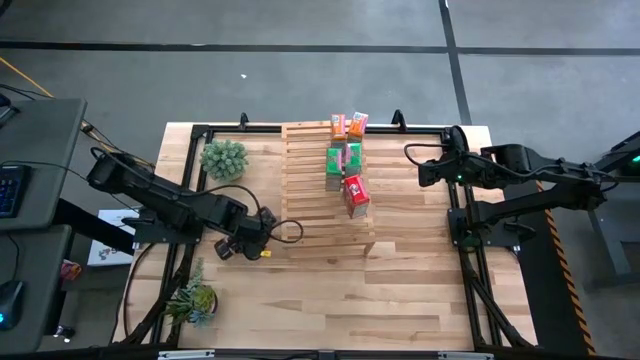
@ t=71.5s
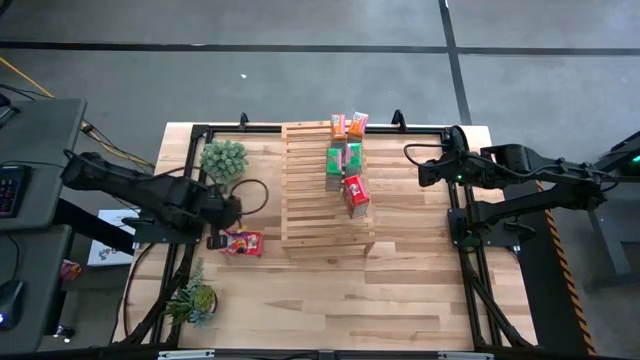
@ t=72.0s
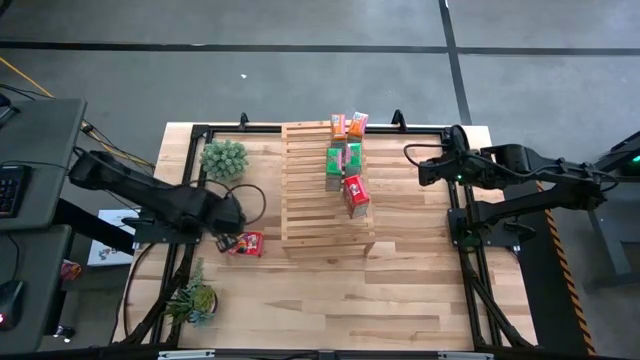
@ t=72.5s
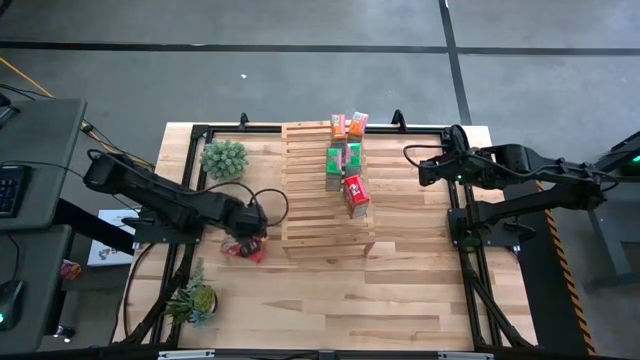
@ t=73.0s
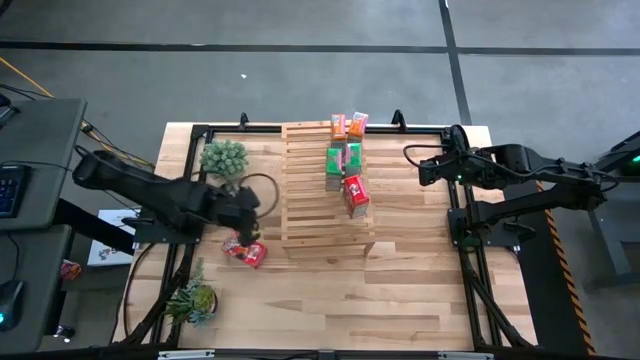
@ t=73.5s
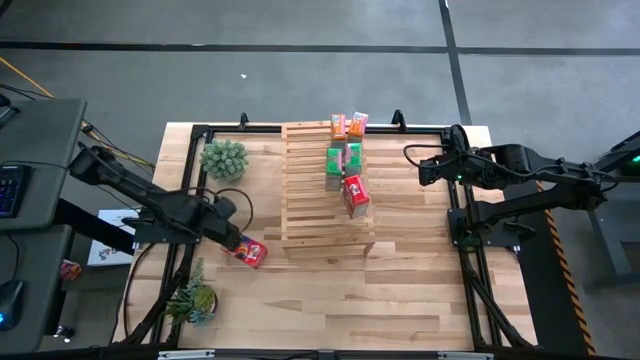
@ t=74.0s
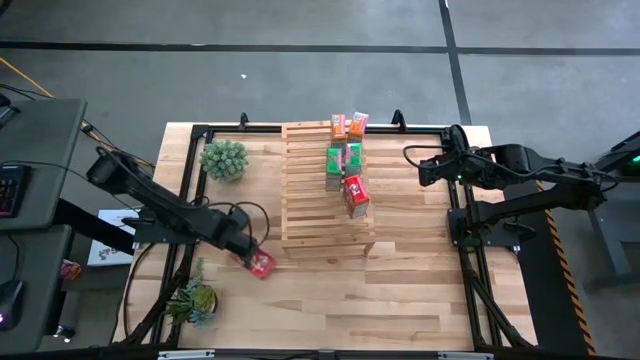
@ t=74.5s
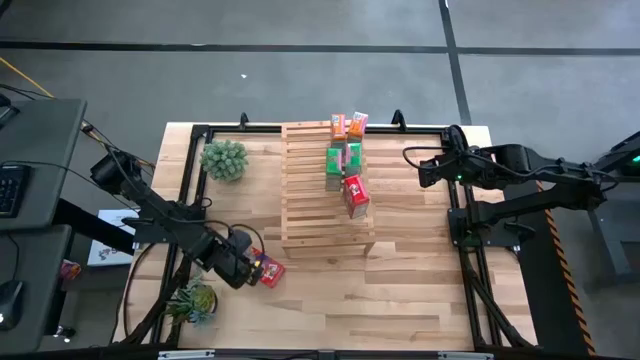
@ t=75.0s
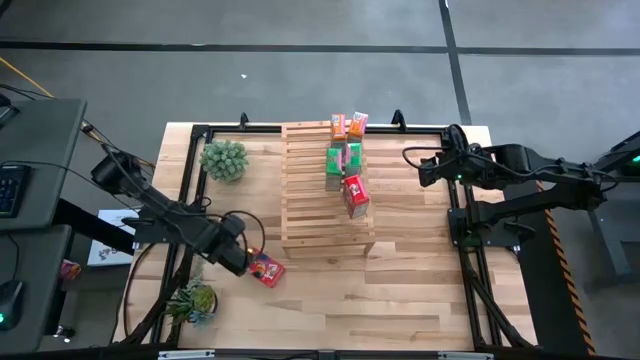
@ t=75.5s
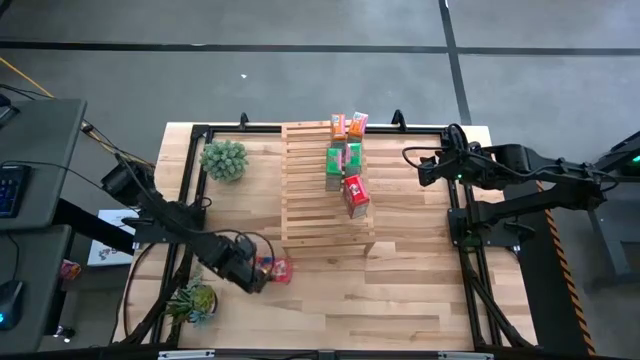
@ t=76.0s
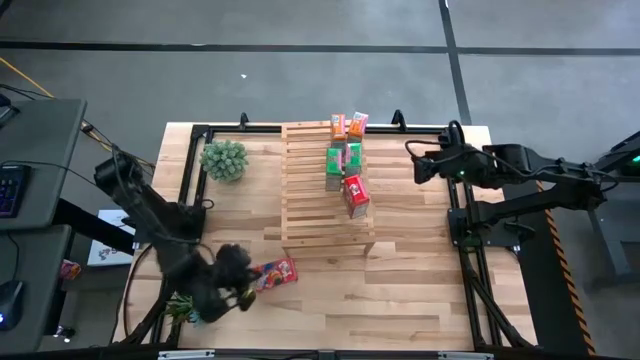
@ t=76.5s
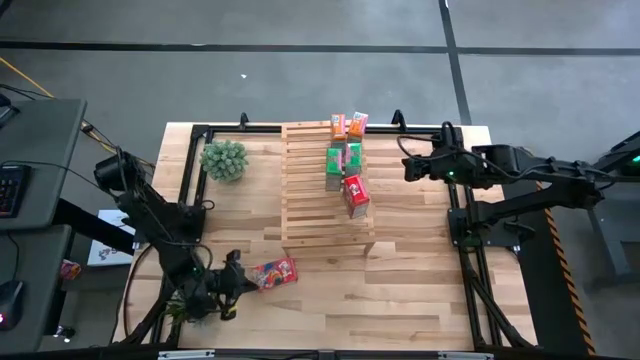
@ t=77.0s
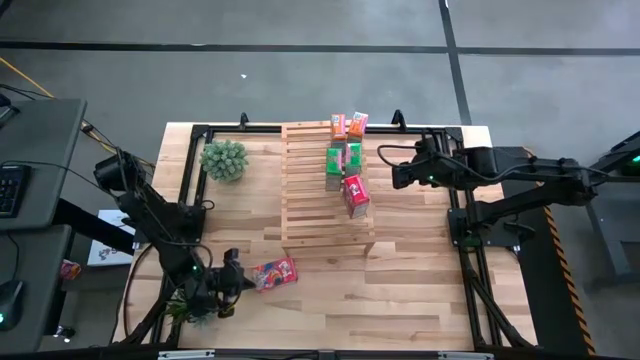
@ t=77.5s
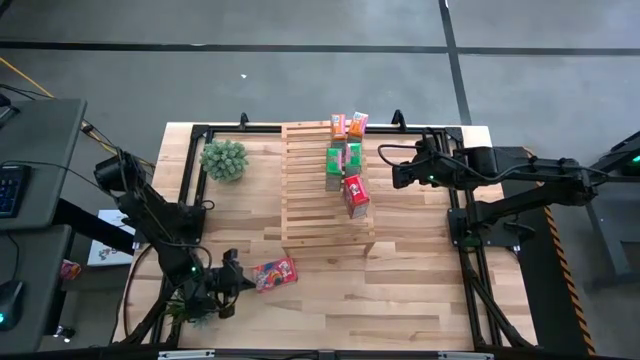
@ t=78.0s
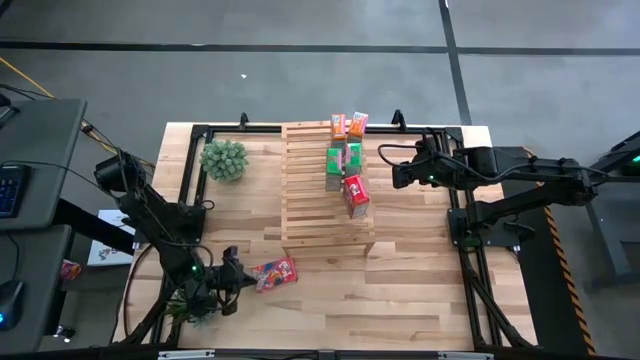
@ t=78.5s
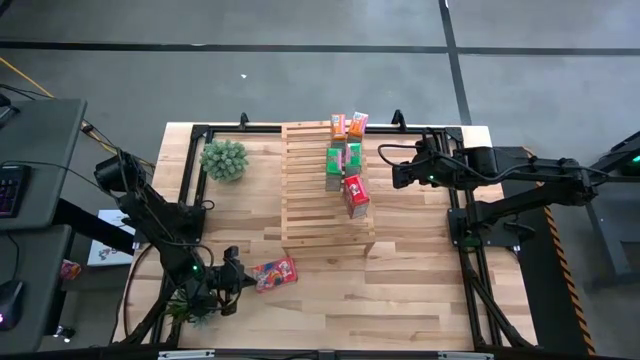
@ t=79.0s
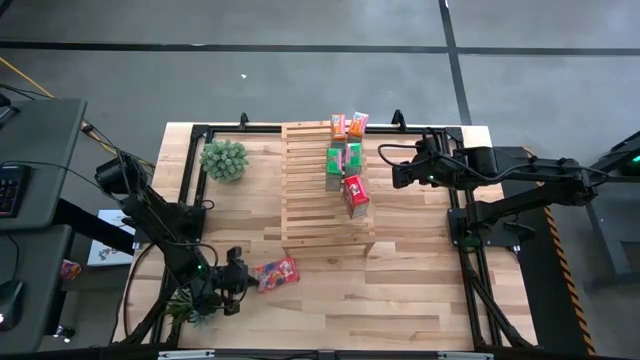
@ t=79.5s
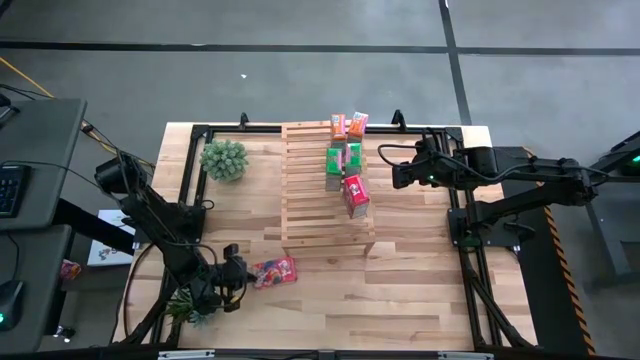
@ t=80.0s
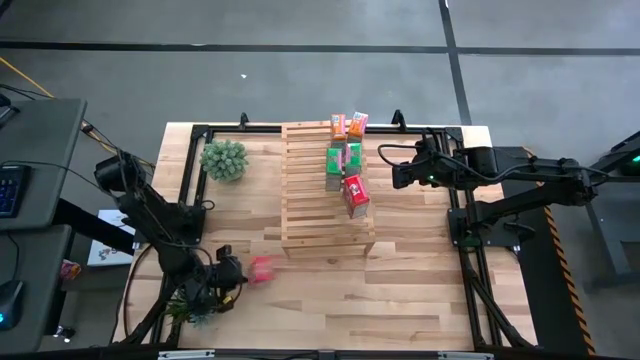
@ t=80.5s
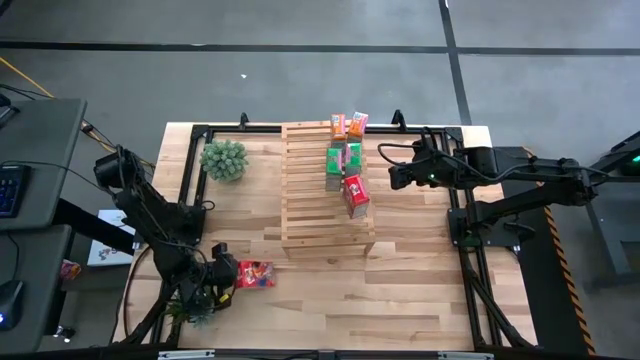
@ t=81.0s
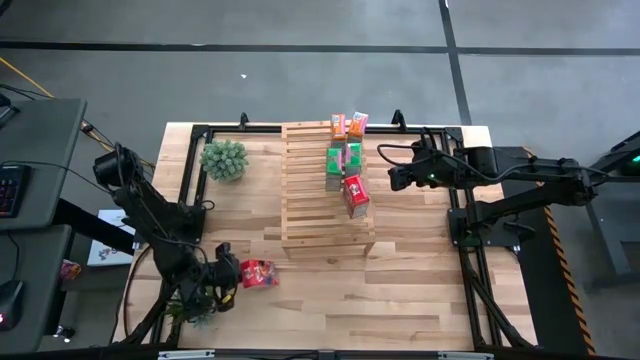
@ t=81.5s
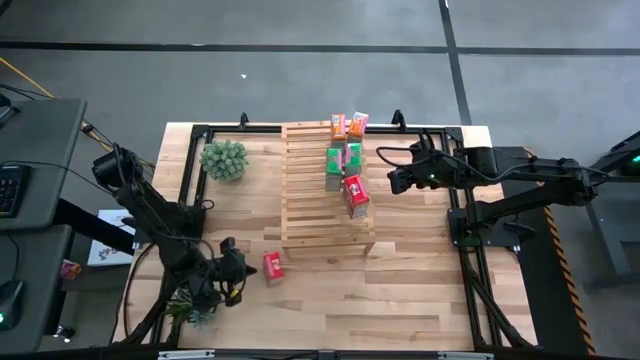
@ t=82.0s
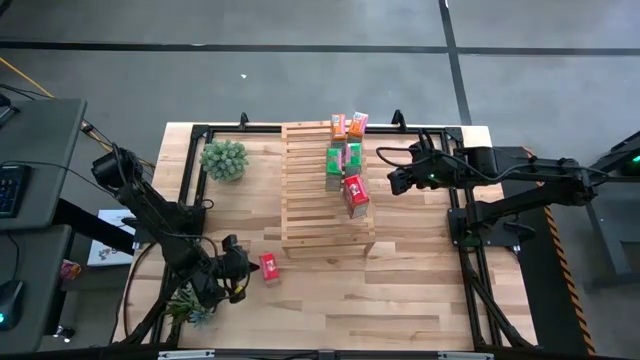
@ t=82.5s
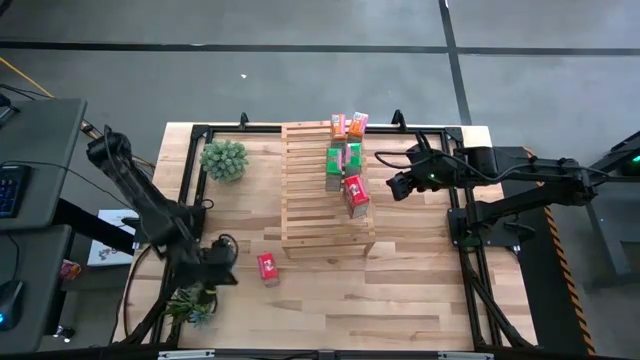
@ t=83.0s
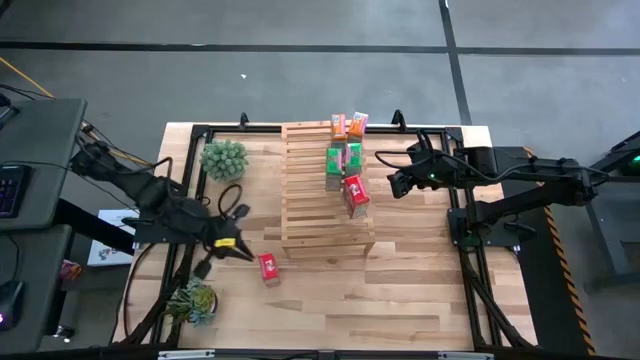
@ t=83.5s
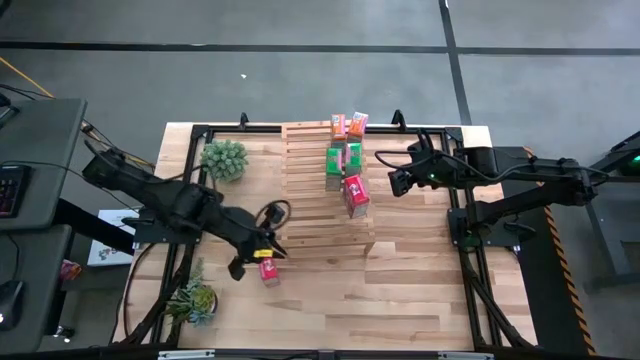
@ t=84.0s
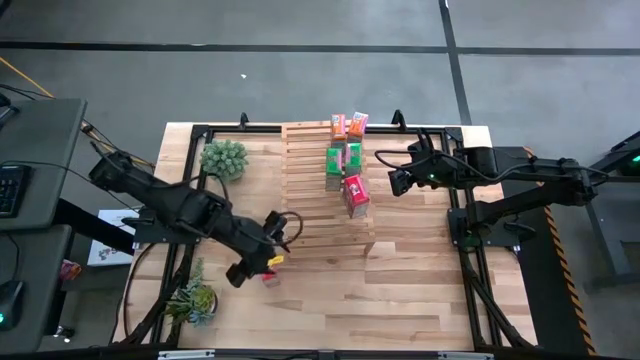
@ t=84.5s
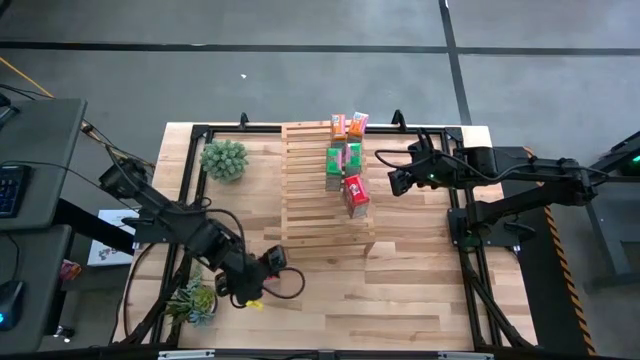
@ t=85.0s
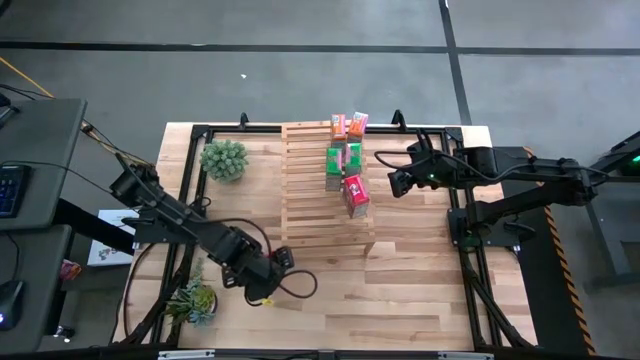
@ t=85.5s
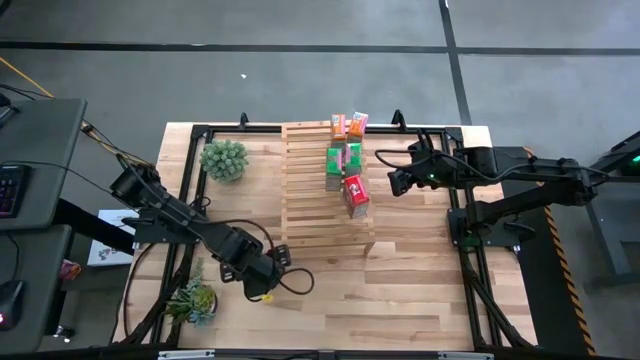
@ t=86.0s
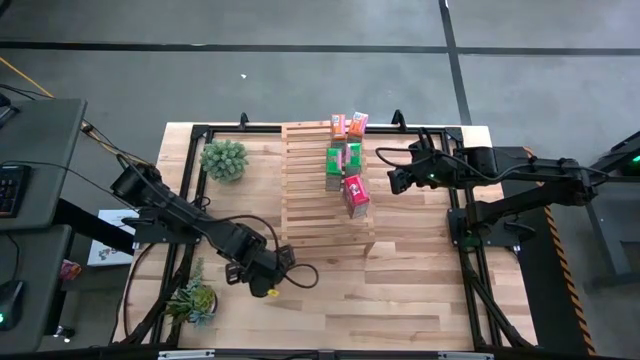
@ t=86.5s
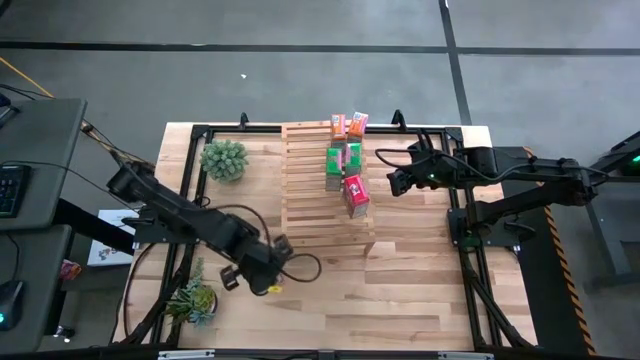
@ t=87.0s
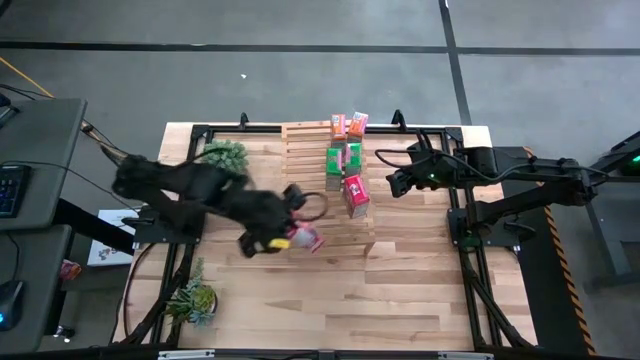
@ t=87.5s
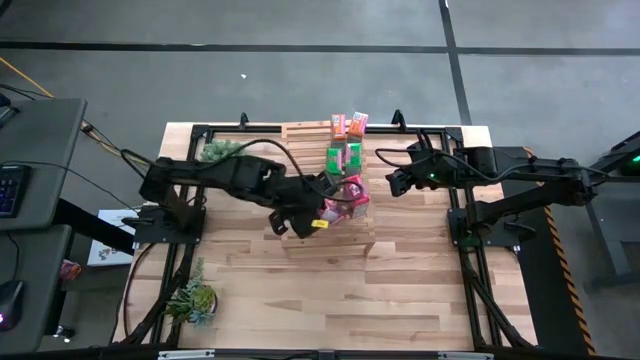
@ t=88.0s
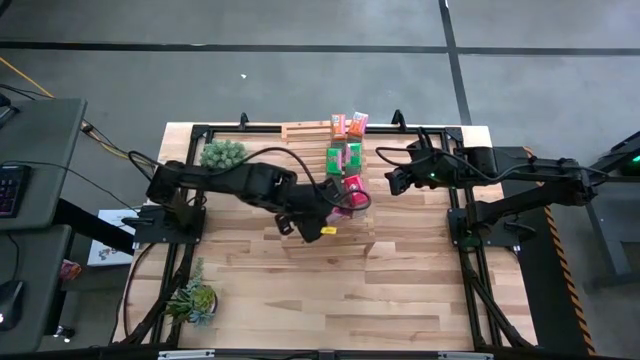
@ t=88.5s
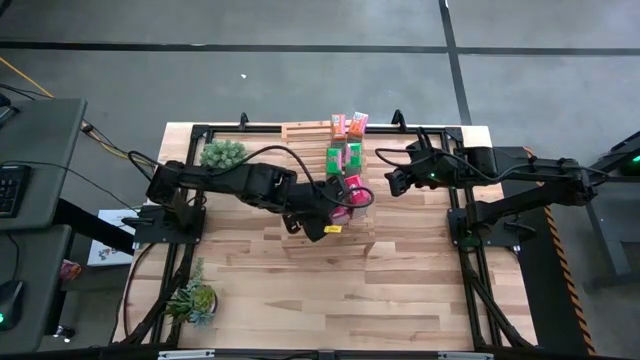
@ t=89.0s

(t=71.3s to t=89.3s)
Task: Stack cereal on shelf
Put the red cereal box on the shelf aligned with the other red cereal box

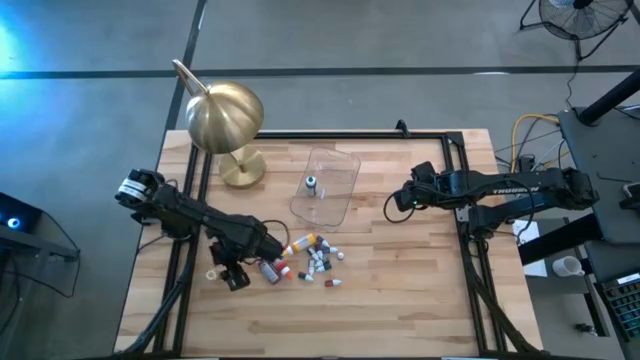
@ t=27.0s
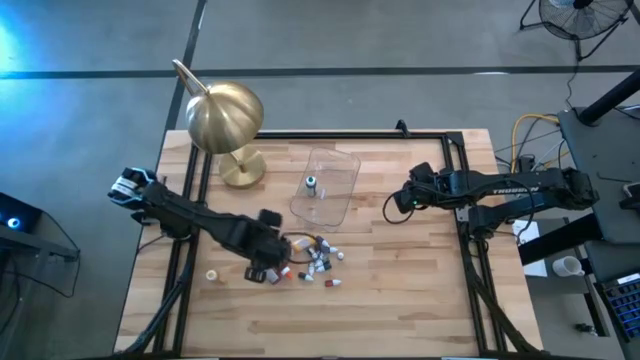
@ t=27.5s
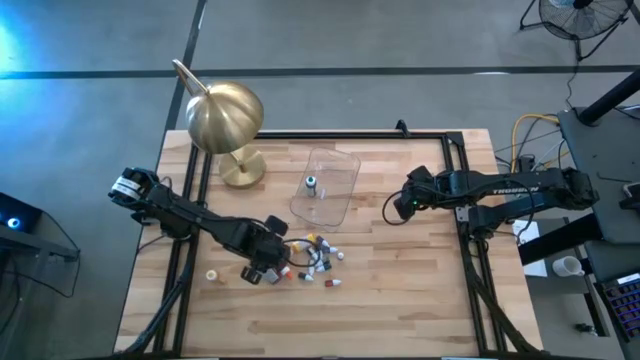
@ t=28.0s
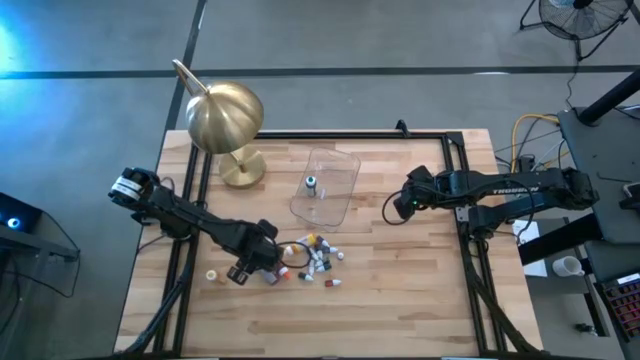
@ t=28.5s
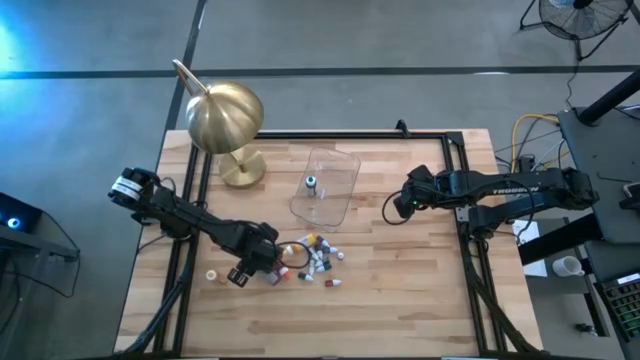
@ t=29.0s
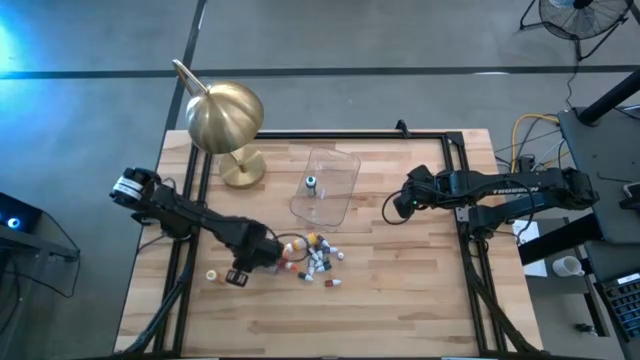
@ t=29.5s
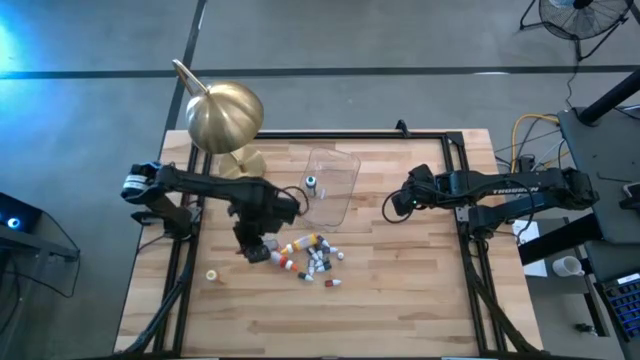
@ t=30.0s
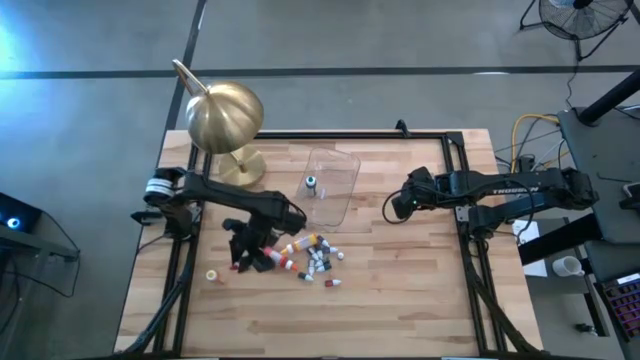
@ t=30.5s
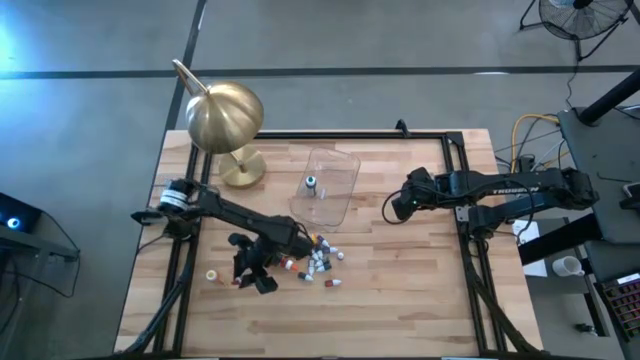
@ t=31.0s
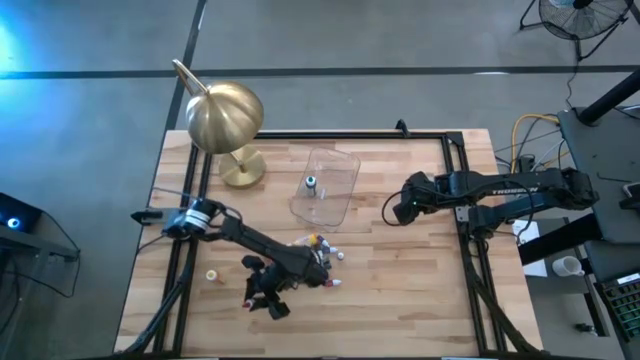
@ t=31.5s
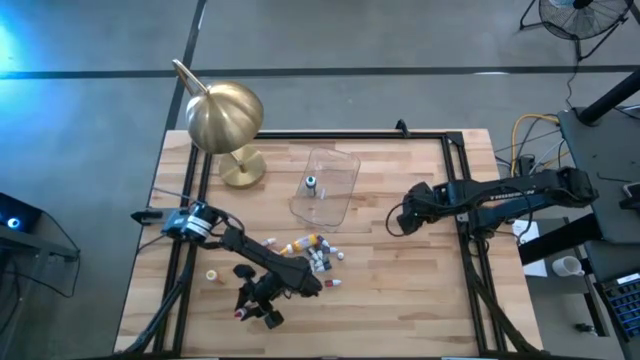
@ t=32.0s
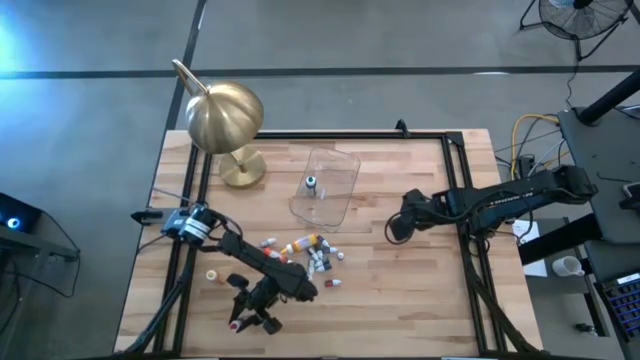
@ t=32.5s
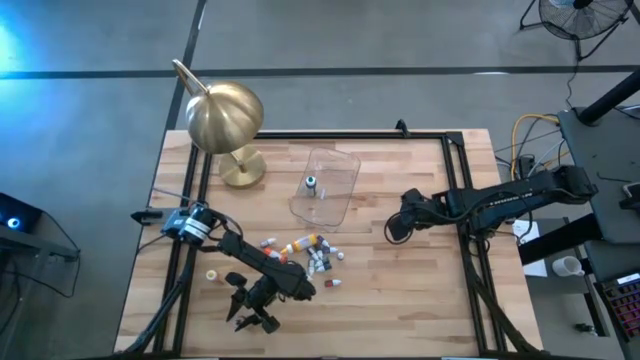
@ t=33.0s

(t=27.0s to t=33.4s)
Task: Pick & Place food coloring
Move the large red food coloring bottle to the lower left of the table
